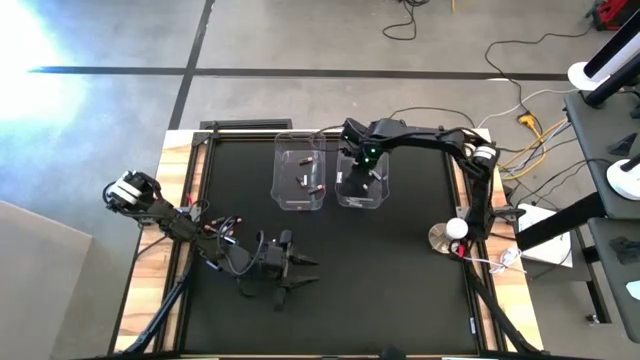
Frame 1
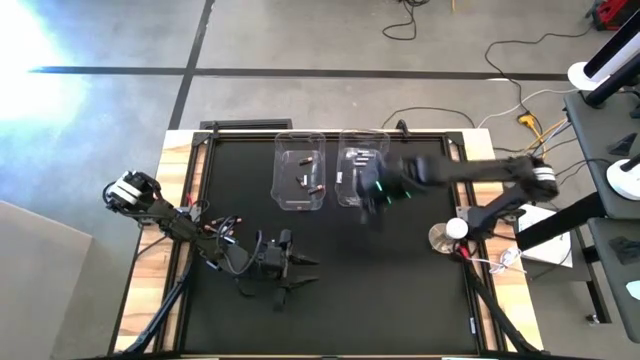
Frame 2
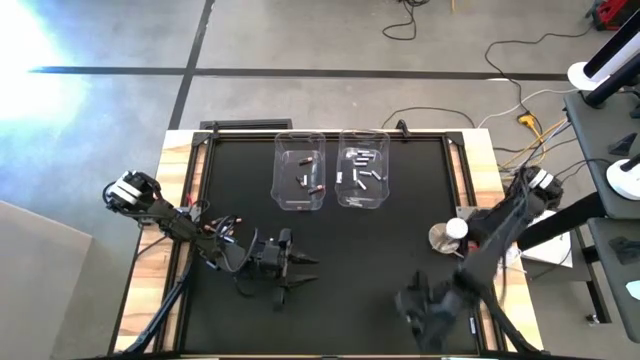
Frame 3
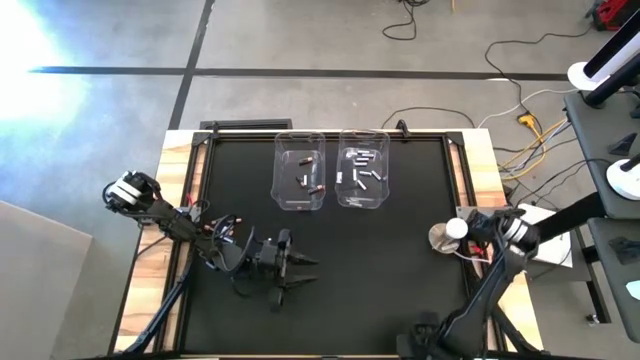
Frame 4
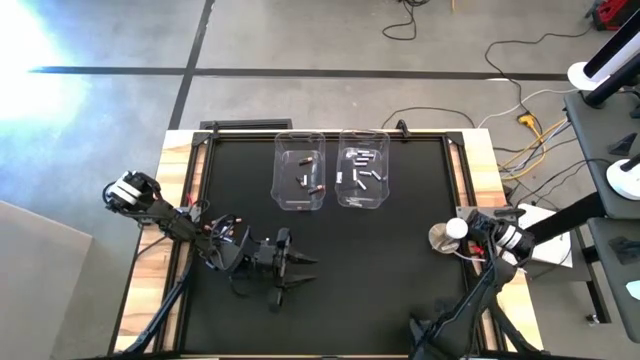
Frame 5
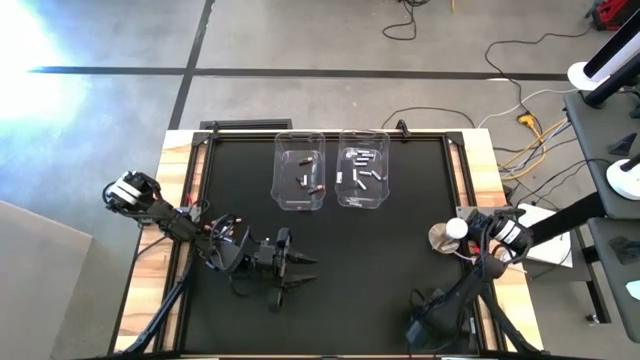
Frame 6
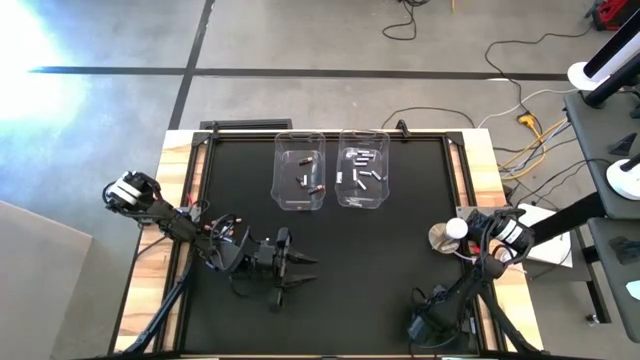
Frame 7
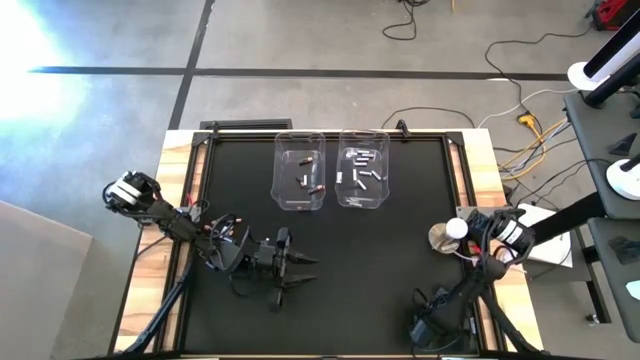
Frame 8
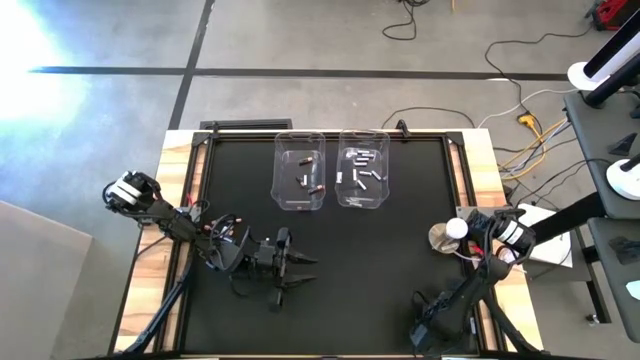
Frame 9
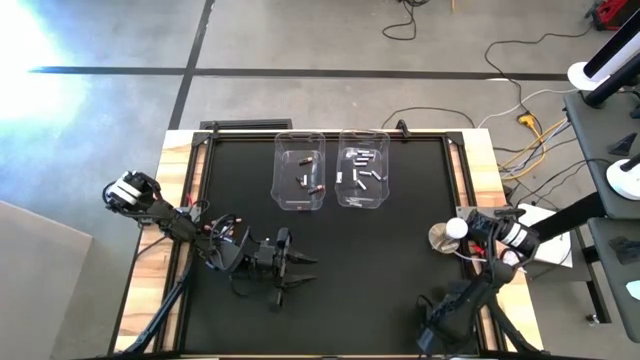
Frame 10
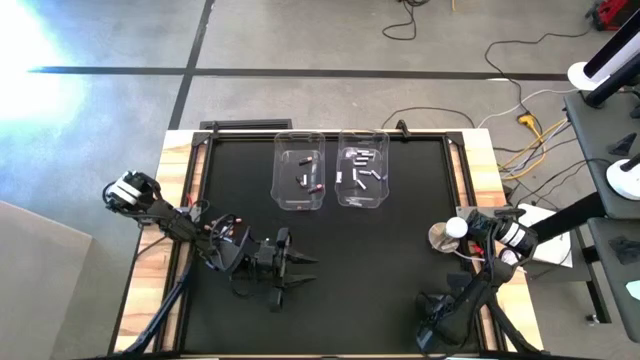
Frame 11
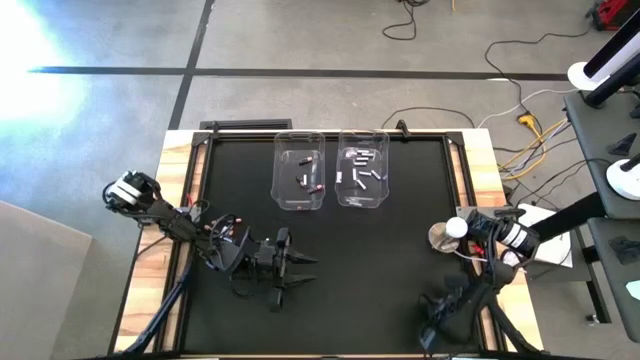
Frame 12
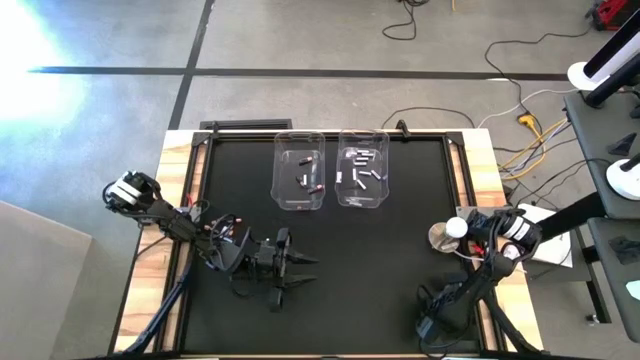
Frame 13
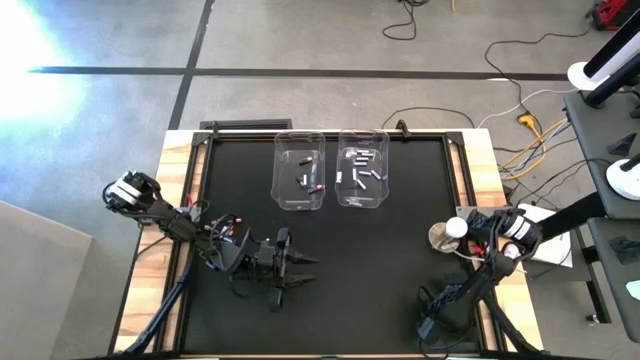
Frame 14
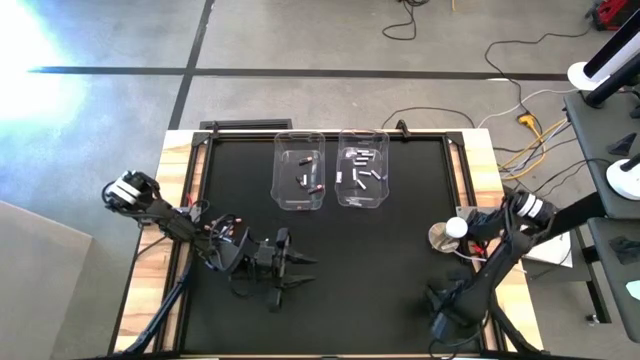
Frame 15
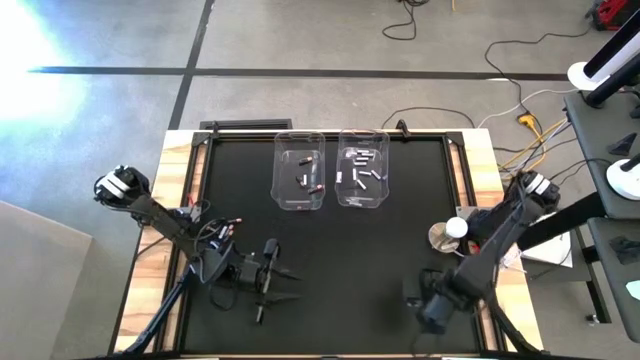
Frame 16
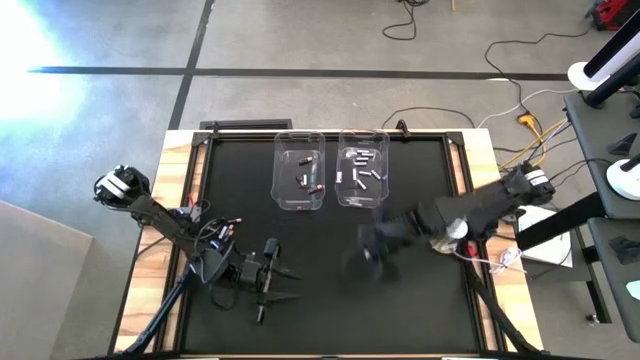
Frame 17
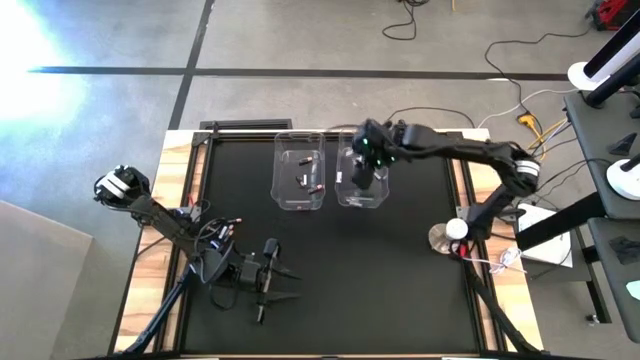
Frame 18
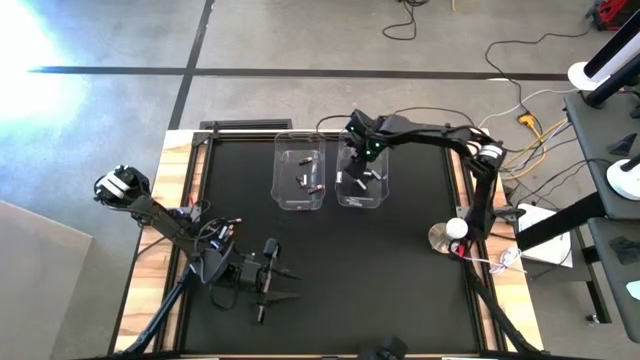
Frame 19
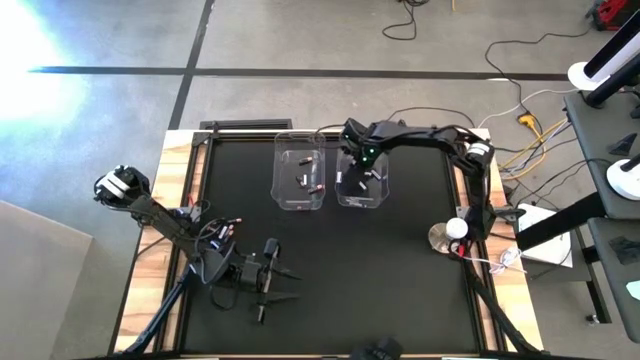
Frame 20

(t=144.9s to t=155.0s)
Task: Sort batteries
Put the white battery into the right transparent bin

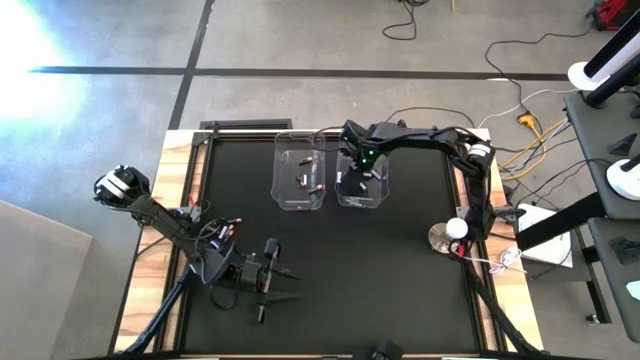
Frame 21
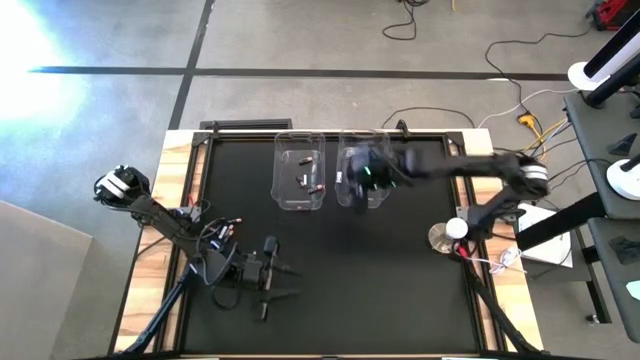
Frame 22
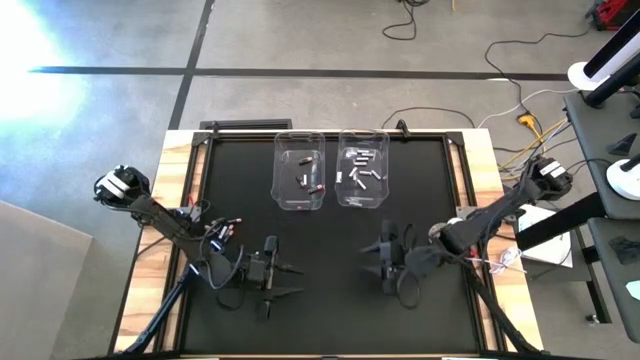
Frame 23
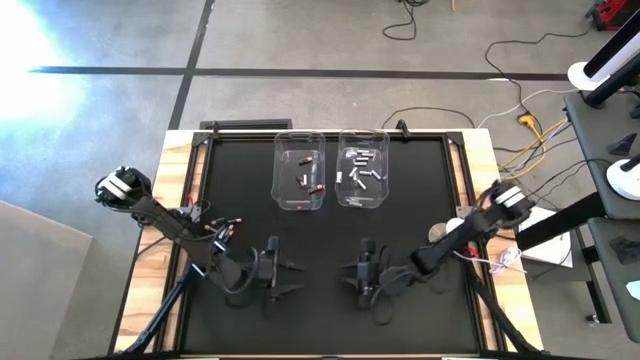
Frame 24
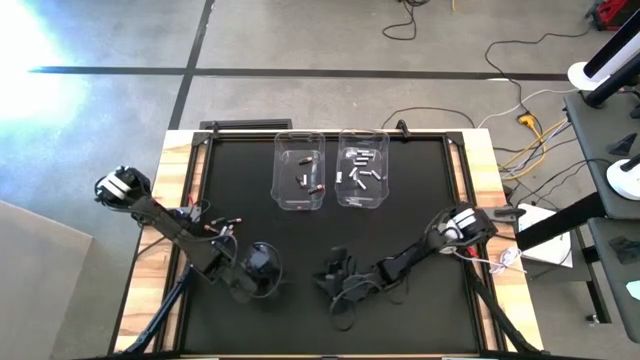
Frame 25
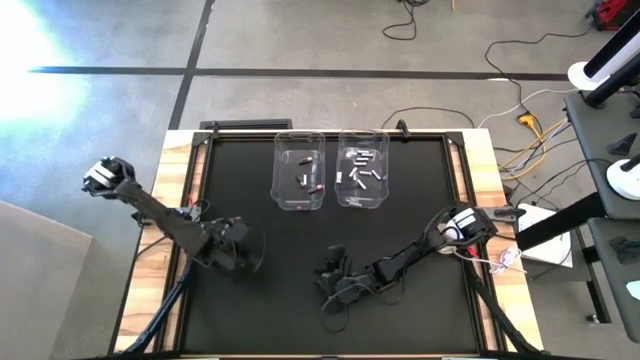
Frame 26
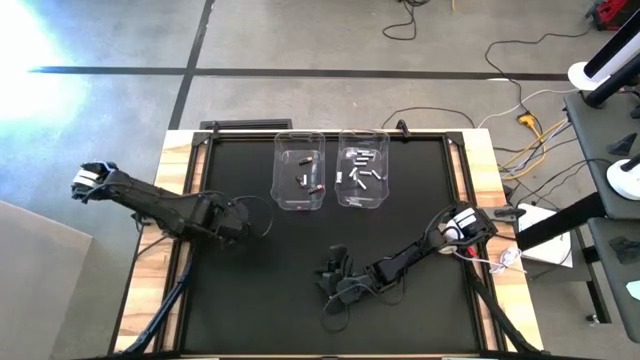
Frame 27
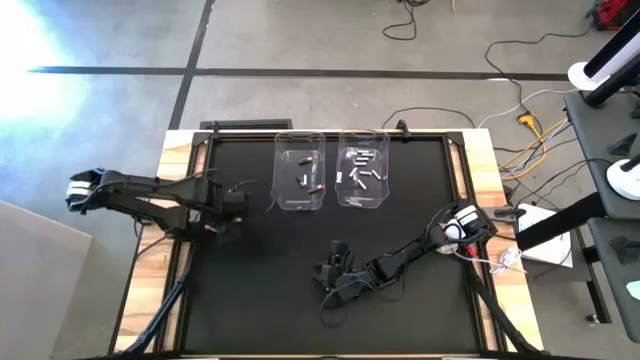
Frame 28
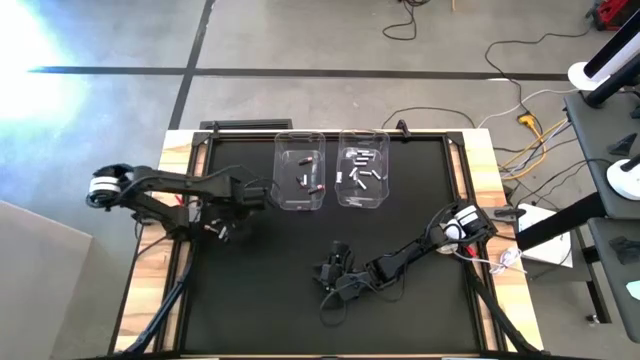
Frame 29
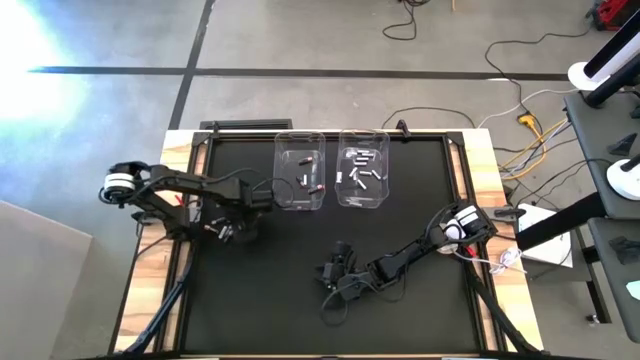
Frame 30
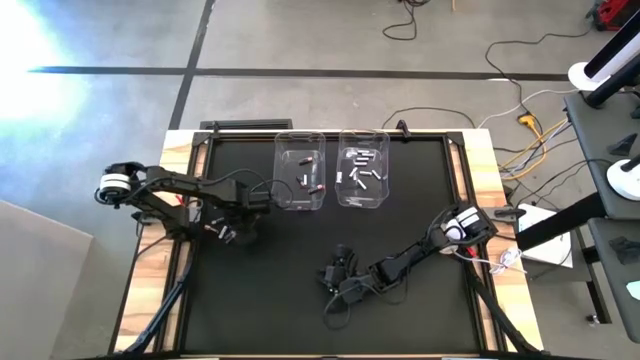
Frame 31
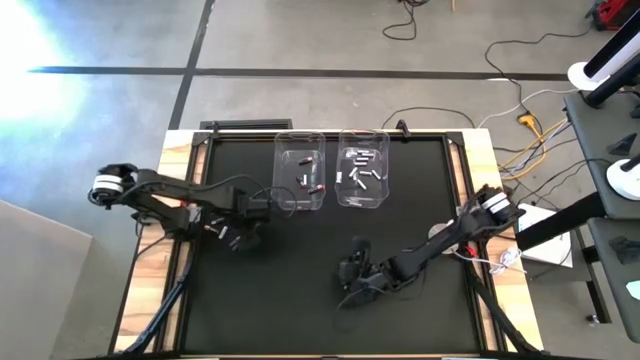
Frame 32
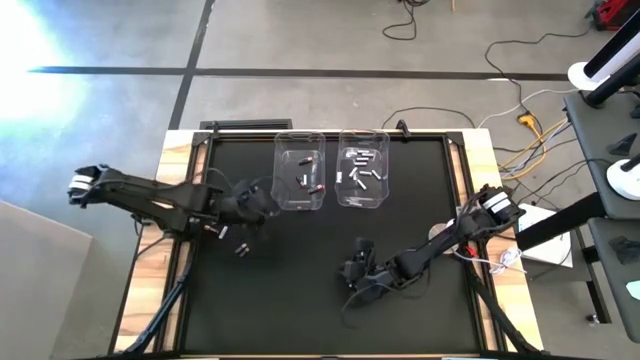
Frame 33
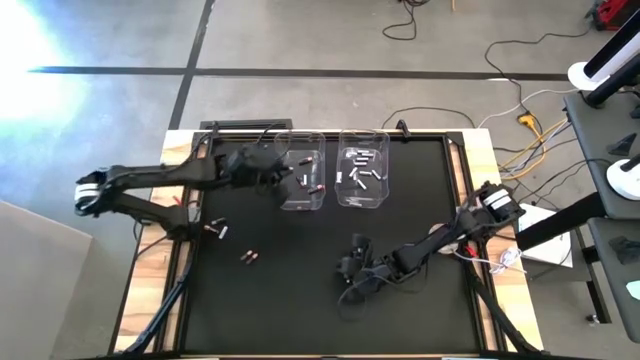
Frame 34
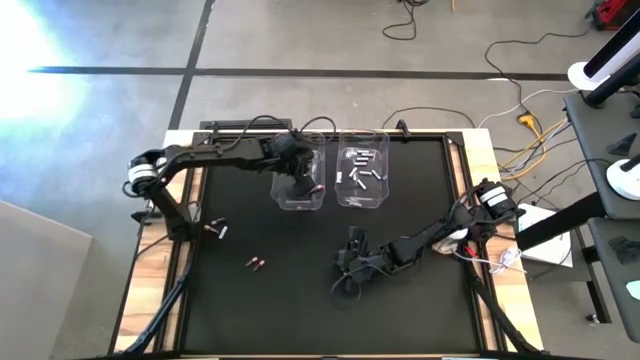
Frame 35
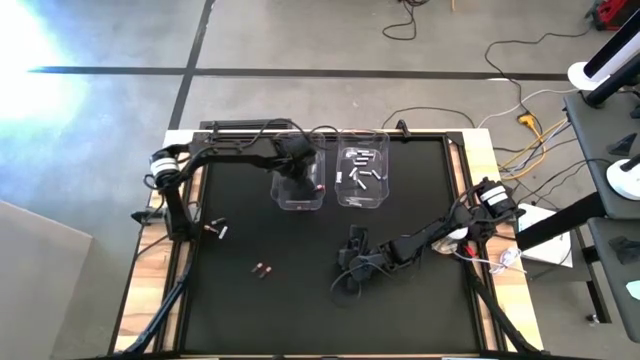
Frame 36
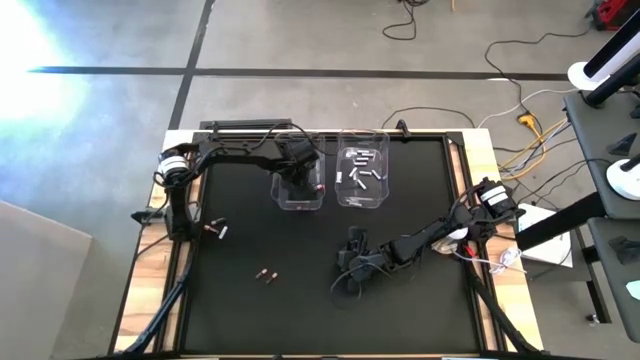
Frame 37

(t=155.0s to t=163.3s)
Put the black battery into the left transparent bin

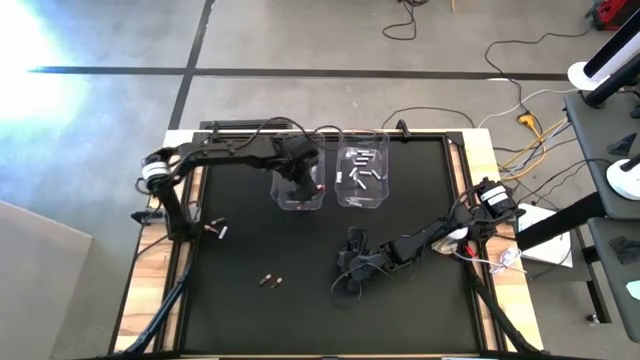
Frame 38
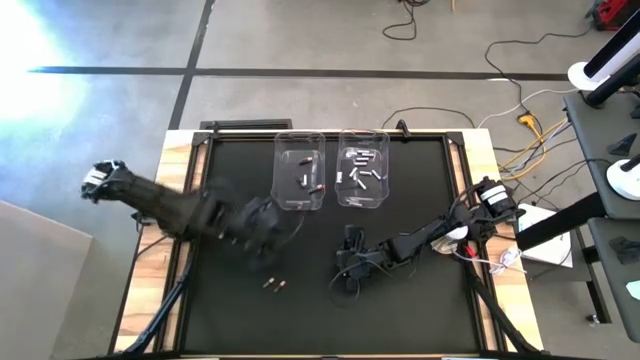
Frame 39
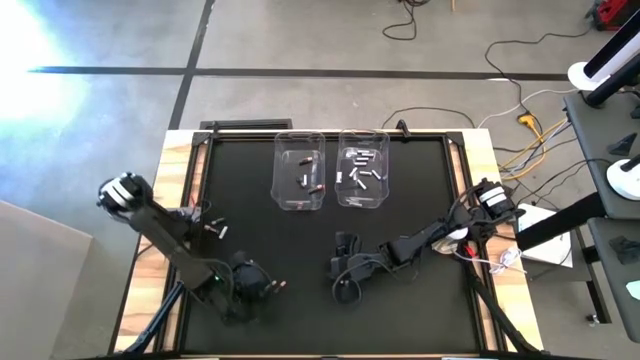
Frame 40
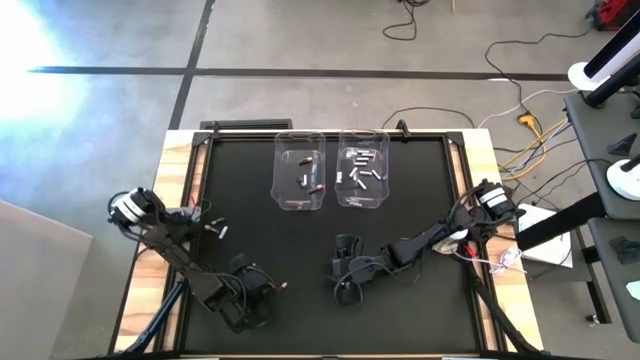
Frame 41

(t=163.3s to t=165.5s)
Put the black battery into the left transparent bin

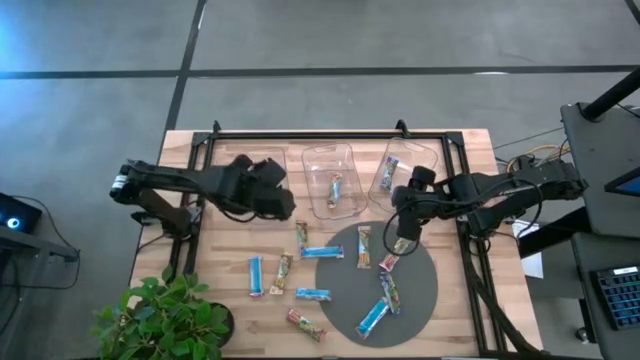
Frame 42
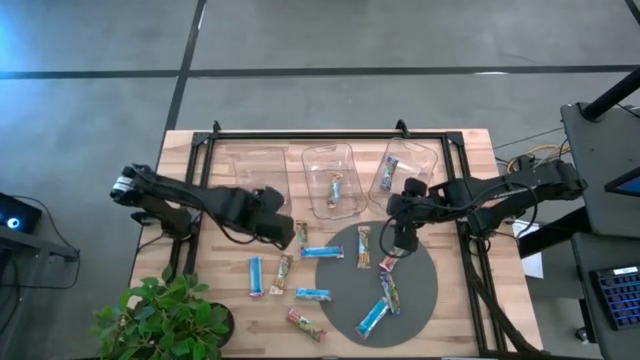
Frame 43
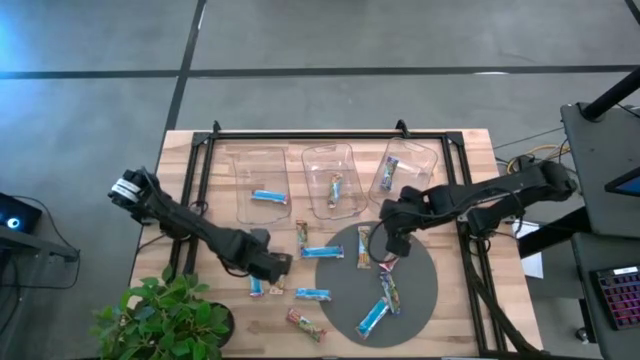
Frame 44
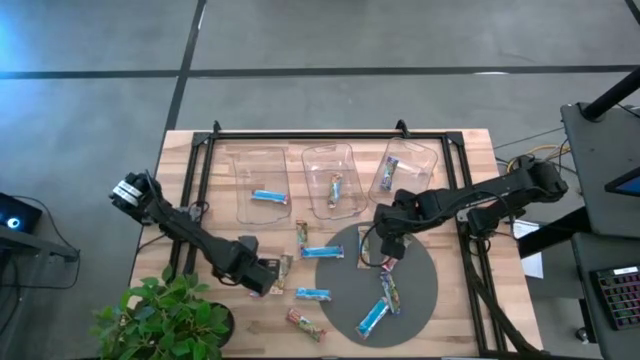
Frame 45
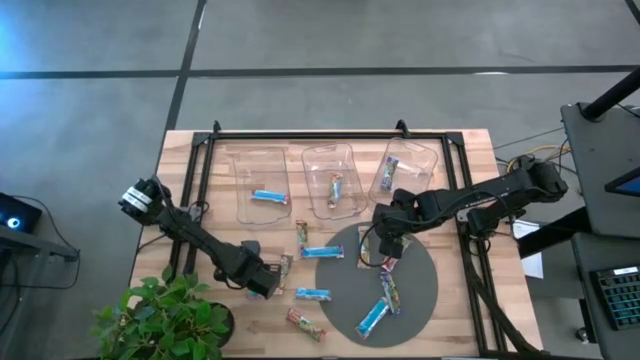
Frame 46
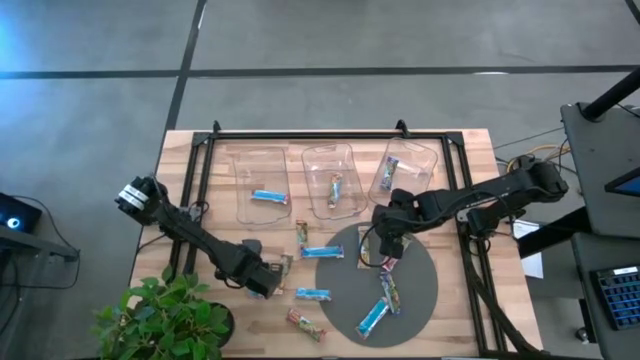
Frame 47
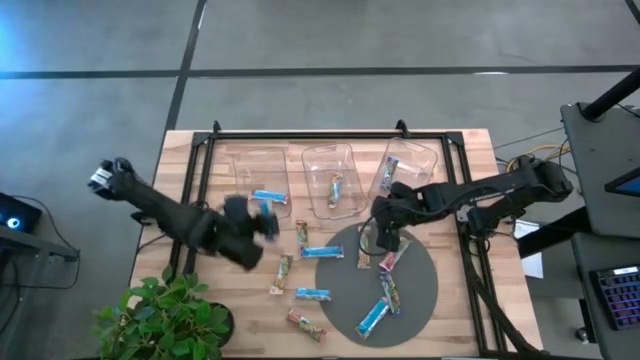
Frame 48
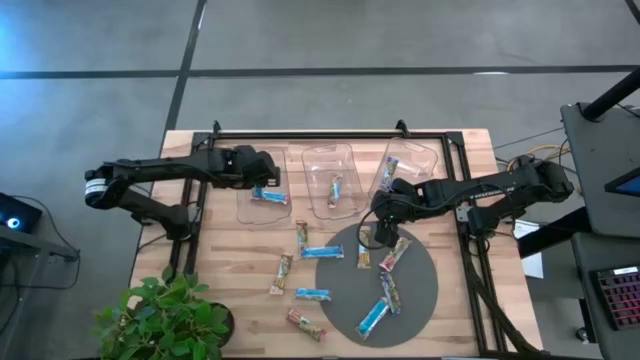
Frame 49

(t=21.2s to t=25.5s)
Task: Pick and place Granola Bars by type
Put the red granola bar into the left transparent bin
